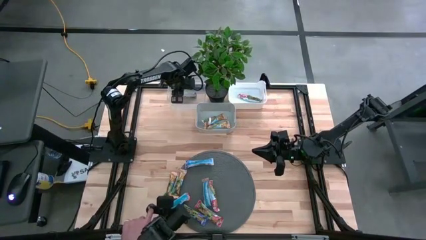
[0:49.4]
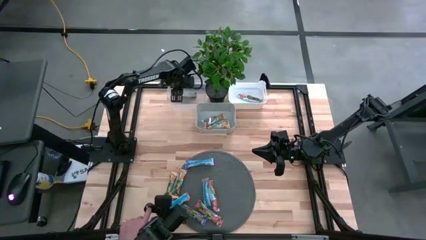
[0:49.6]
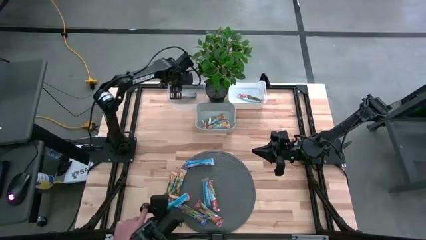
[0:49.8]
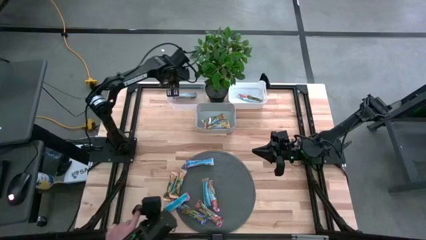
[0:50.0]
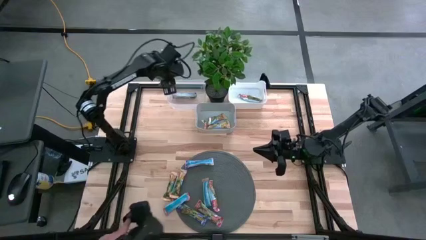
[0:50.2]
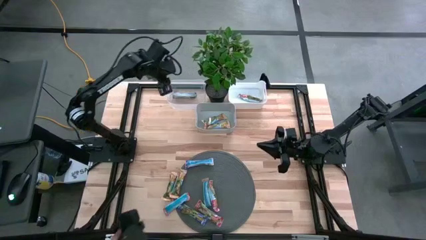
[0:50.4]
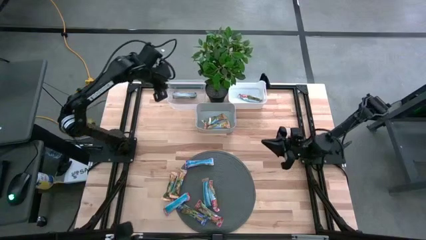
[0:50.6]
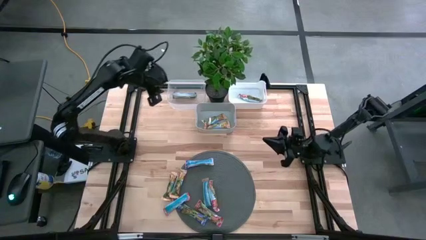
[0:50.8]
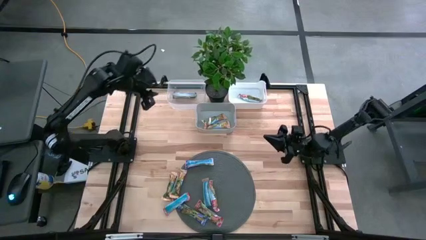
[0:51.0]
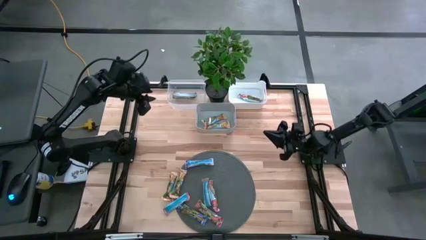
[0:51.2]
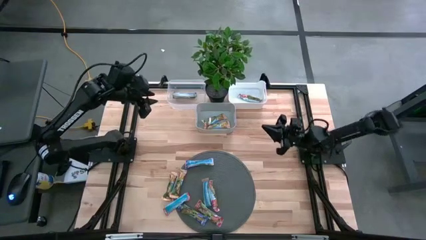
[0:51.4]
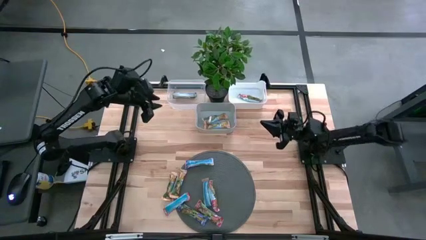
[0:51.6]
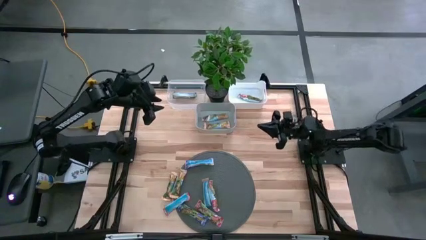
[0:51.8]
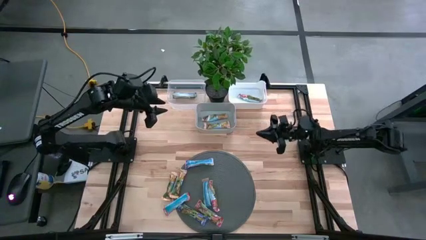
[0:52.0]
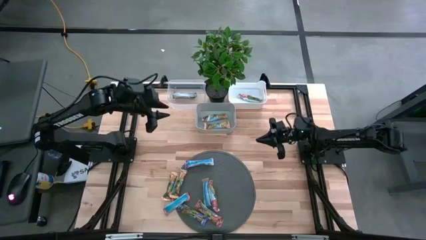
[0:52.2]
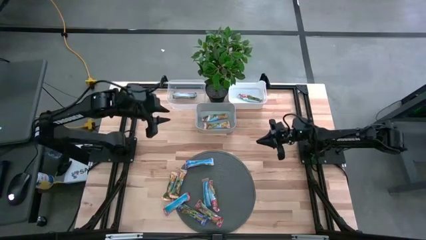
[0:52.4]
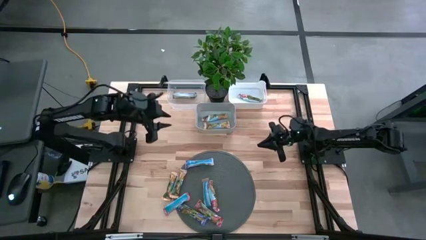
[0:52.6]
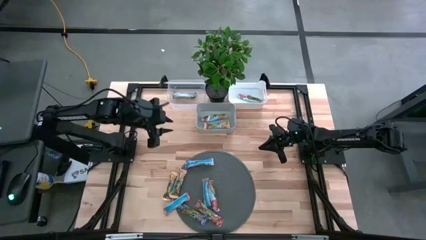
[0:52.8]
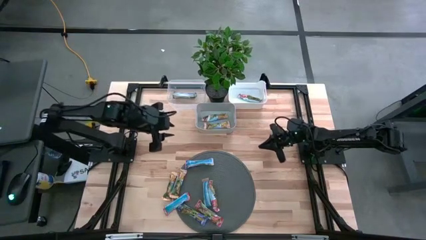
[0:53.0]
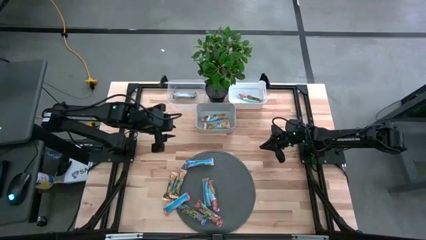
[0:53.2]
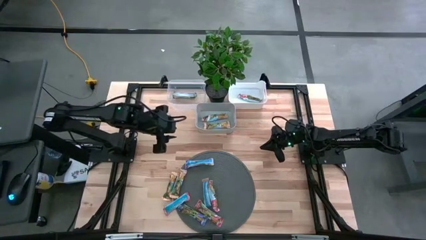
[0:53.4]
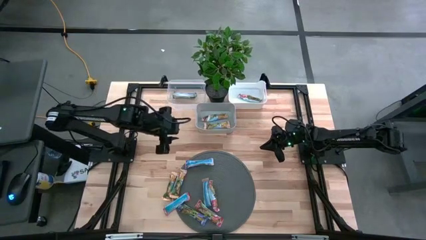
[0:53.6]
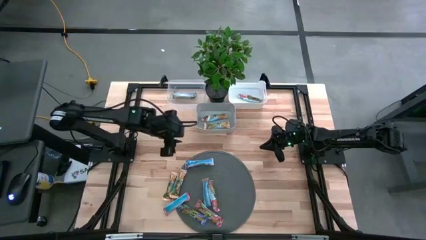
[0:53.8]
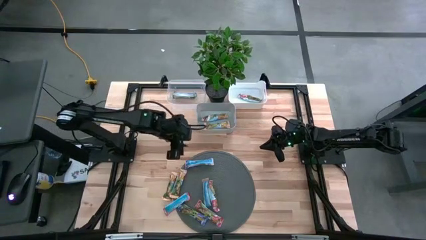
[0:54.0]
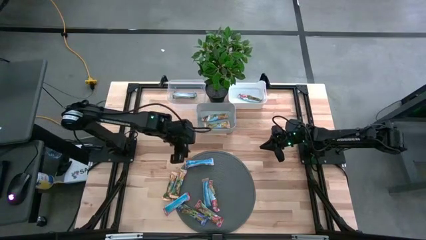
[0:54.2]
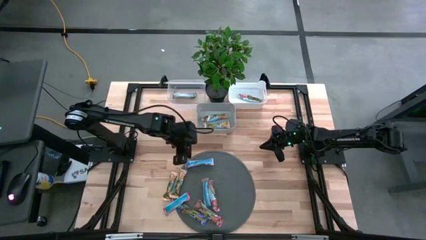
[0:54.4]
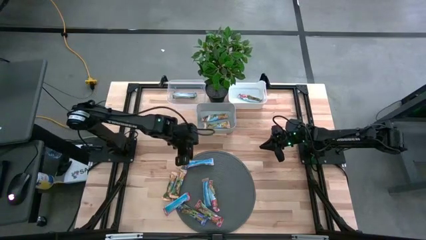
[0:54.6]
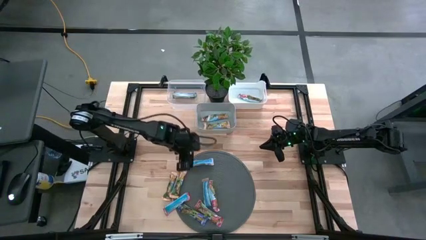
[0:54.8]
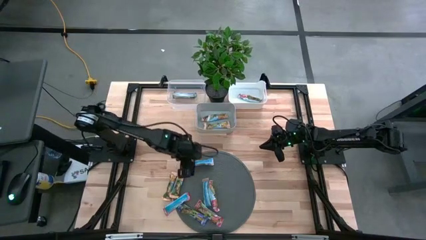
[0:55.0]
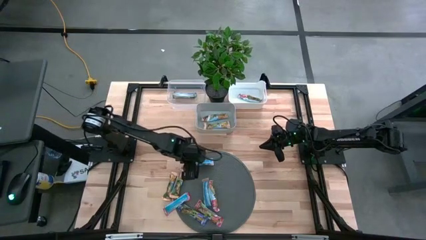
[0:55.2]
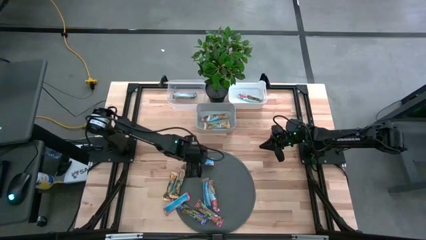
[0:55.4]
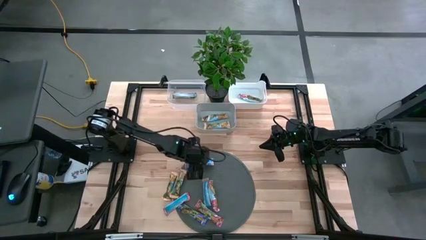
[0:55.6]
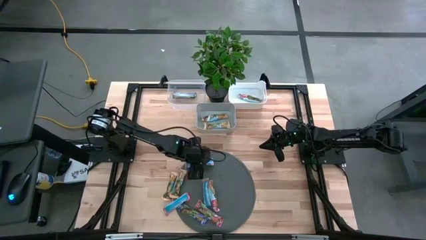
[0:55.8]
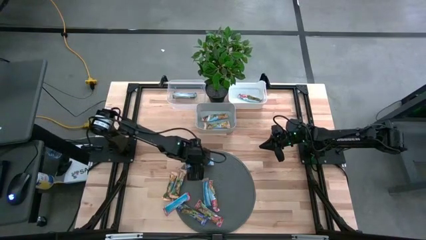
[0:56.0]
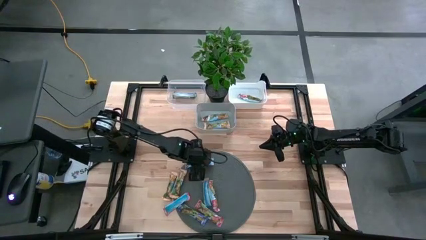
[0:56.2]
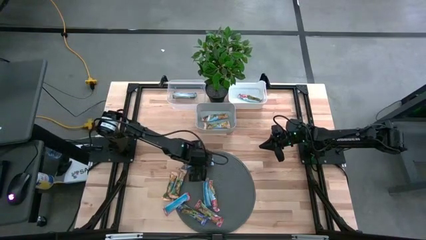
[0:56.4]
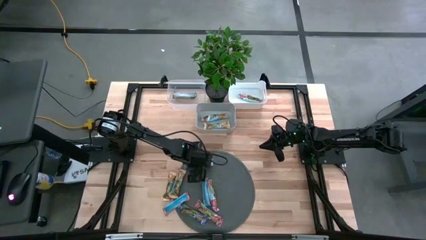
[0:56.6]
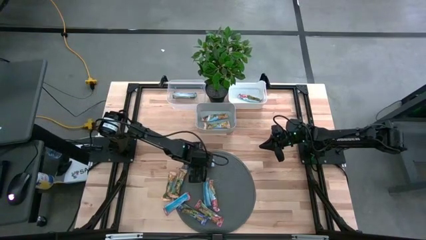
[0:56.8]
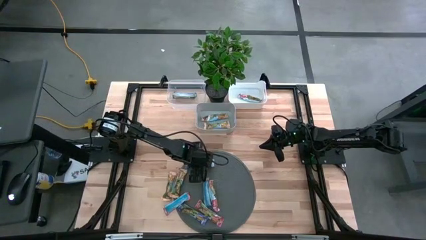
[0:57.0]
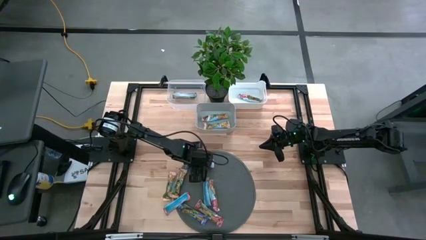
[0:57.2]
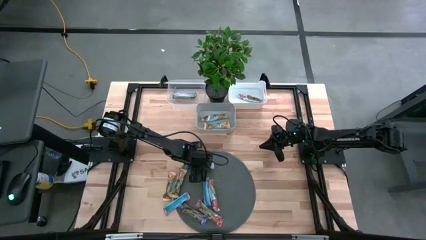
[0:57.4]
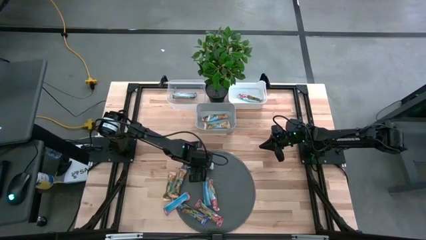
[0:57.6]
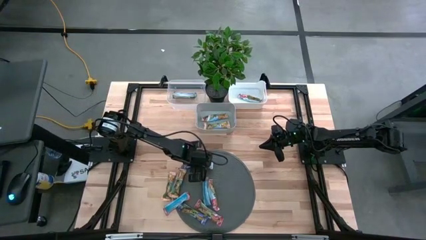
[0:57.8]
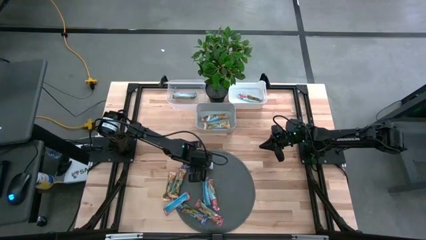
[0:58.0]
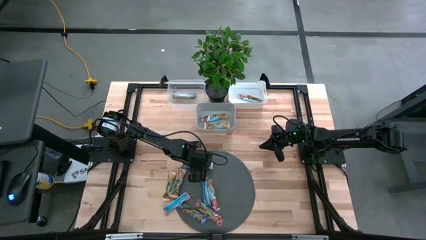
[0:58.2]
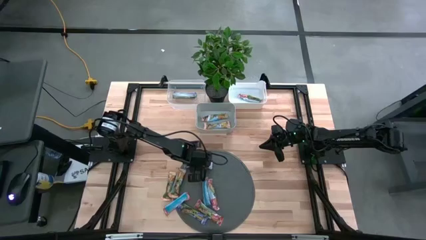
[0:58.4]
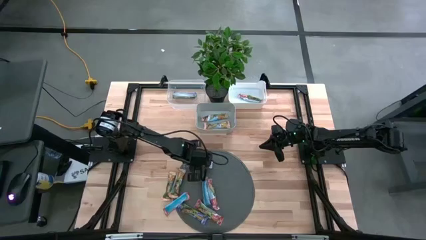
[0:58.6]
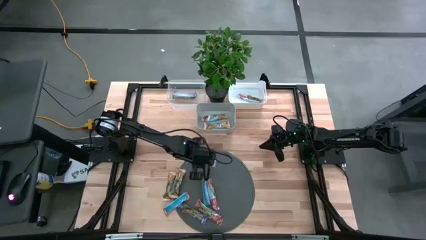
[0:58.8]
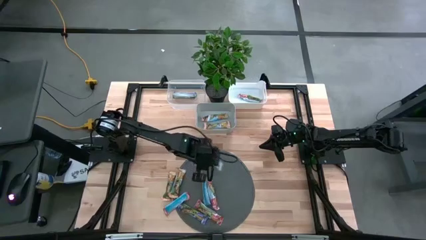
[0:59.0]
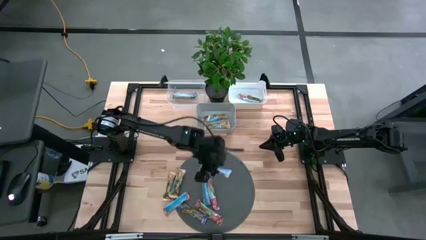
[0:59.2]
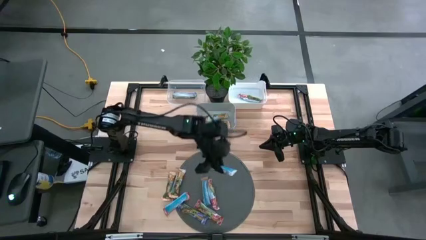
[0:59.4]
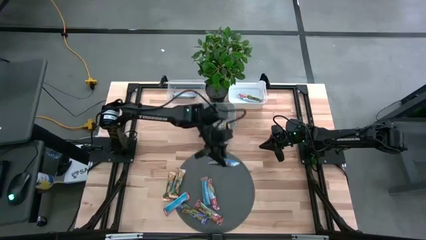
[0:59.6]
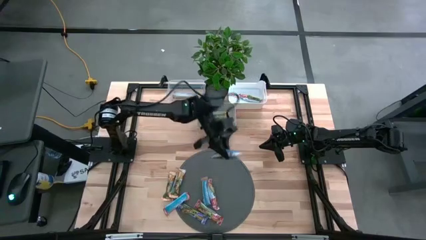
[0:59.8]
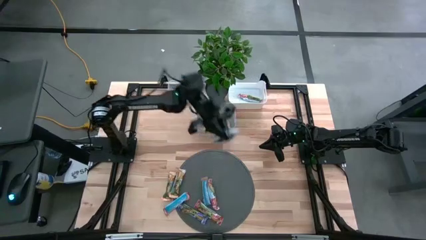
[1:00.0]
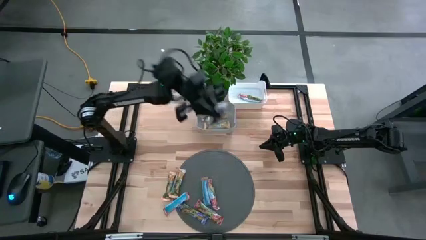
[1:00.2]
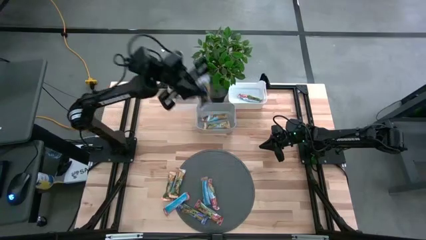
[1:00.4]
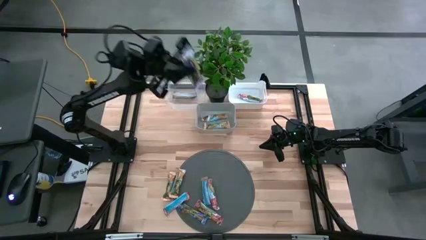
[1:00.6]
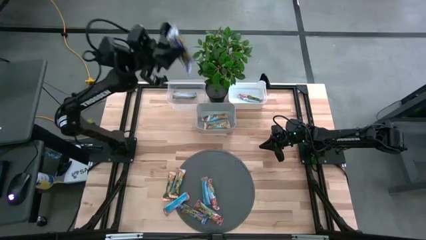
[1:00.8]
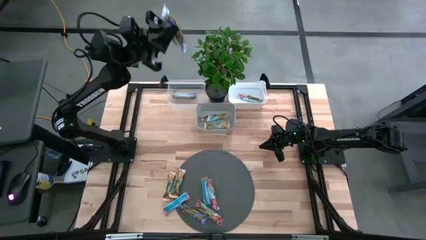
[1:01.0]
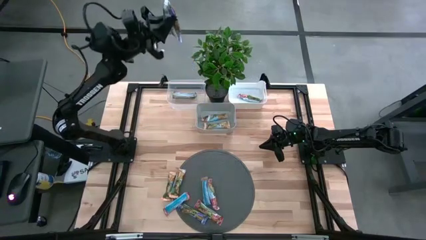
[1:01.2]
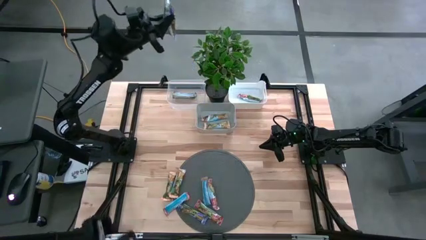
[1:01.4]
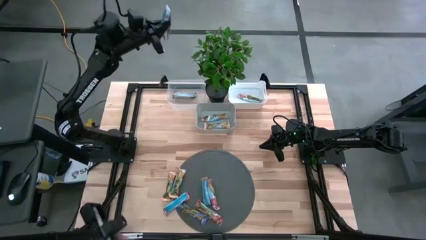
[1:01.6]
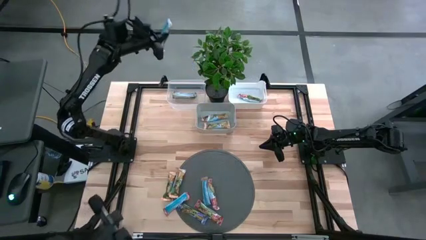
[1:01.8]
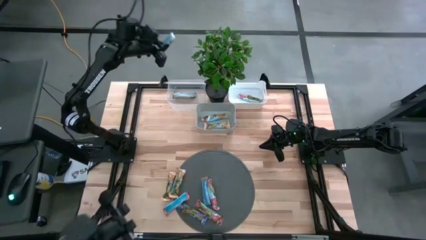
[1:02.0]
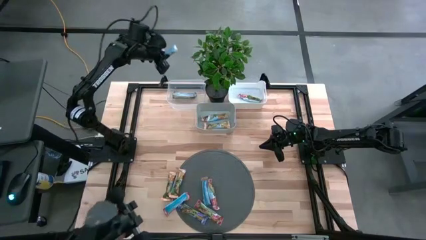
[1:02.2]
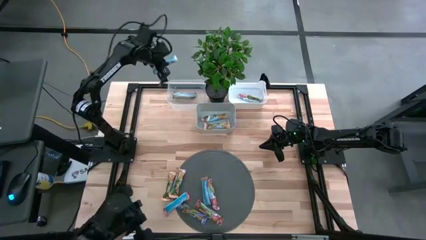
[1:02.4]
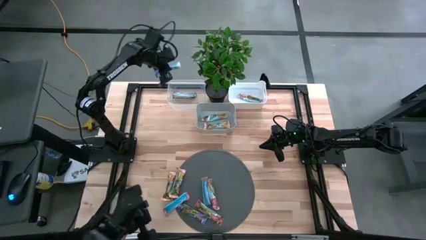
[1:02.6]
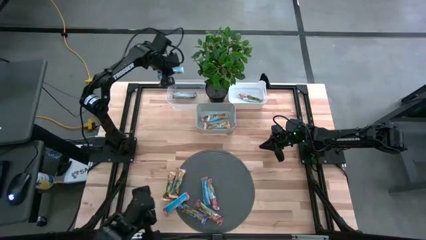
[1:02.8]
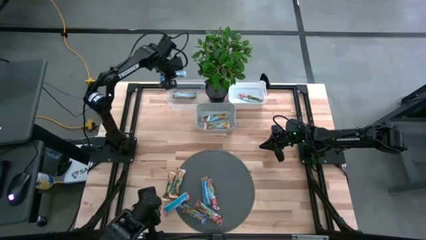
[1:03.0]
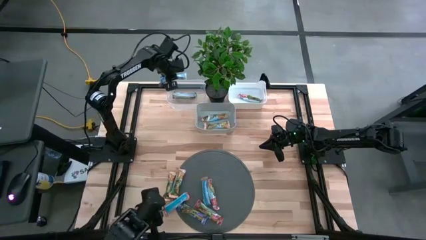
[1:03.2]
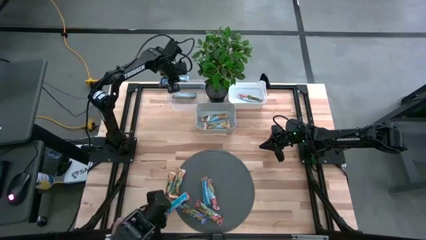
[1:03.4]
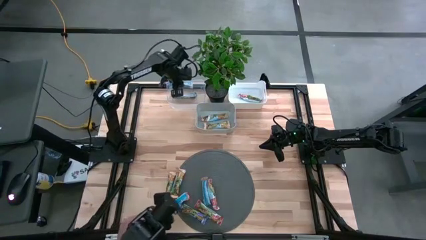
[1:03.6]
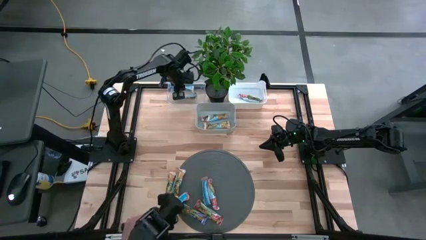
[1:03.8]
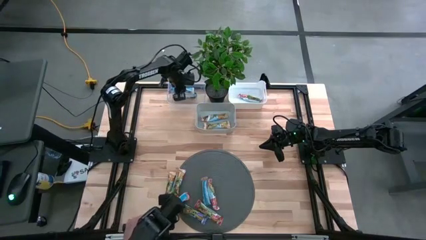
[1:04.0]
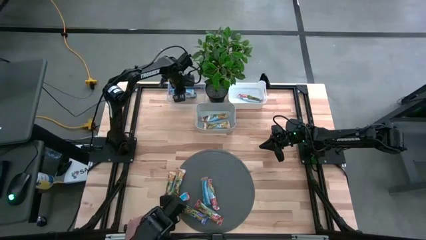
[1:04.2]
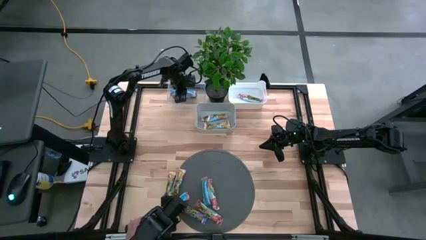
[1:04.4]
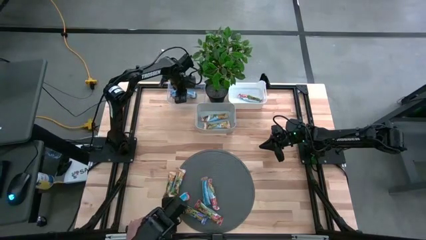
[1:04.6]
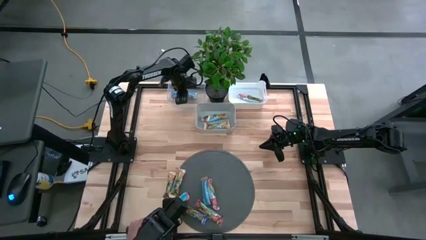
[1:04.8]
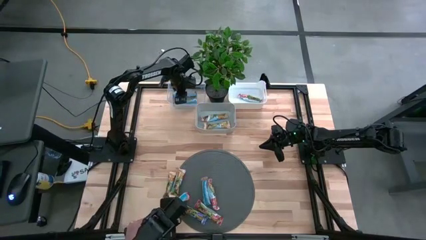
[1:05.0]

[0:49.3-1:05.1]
Task: Pick and place Granola Bars by type
Put the blue granola bar into the transparent bin
